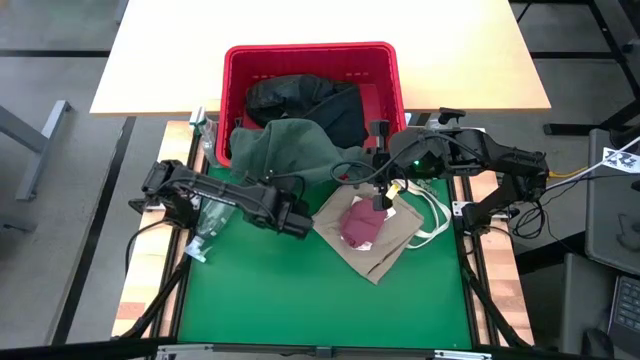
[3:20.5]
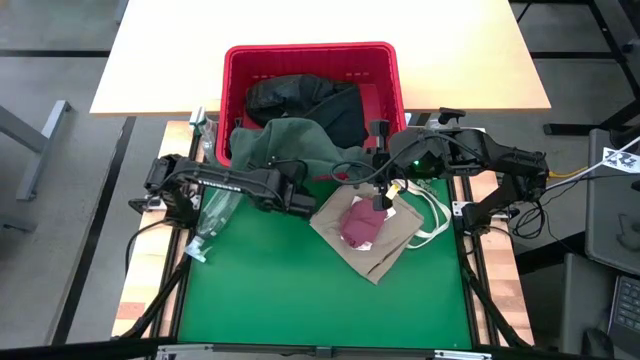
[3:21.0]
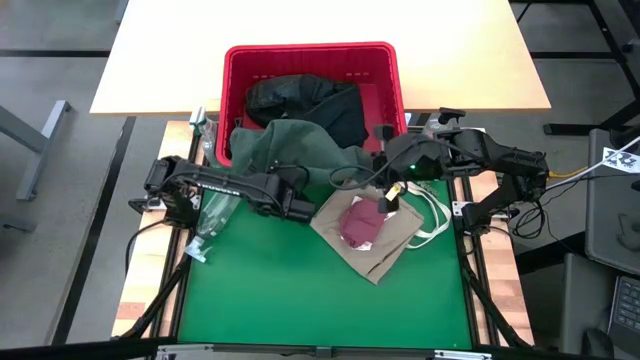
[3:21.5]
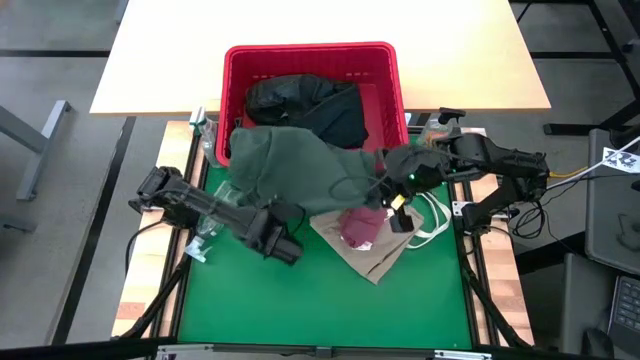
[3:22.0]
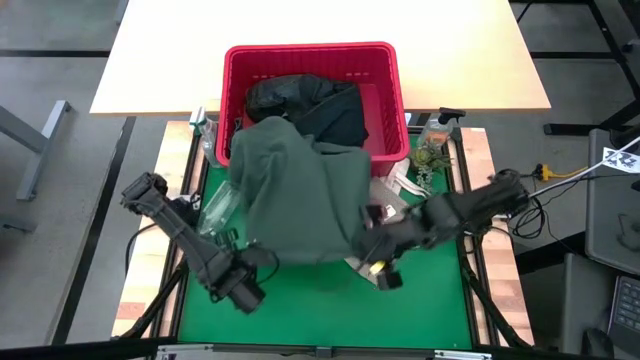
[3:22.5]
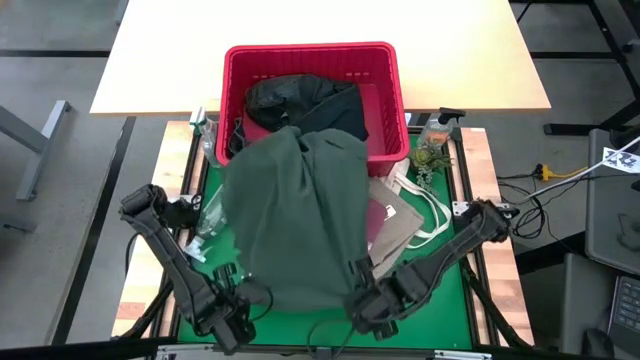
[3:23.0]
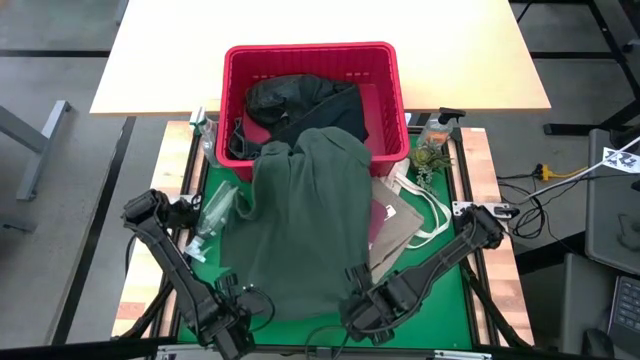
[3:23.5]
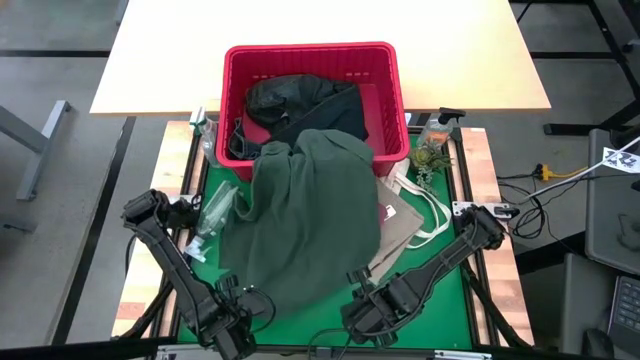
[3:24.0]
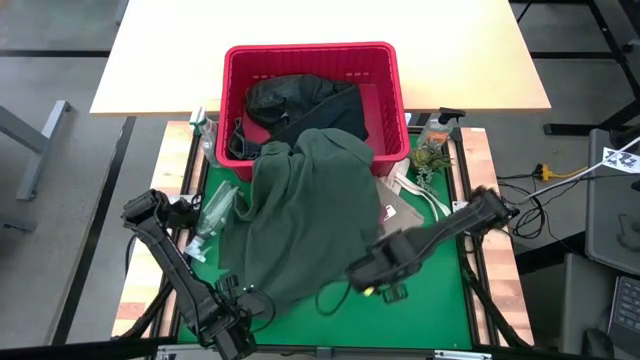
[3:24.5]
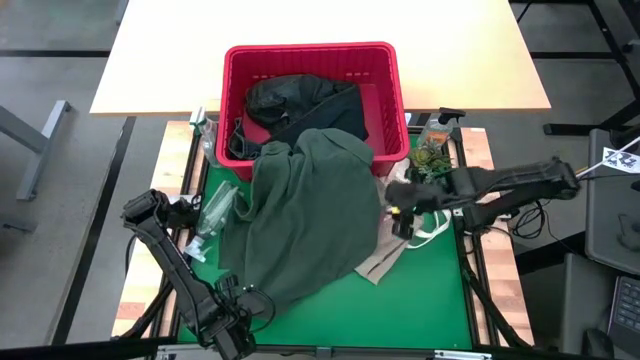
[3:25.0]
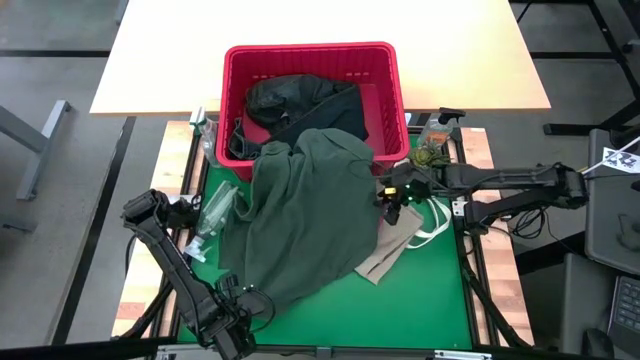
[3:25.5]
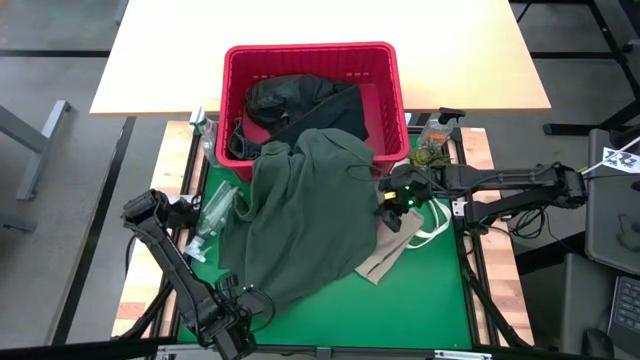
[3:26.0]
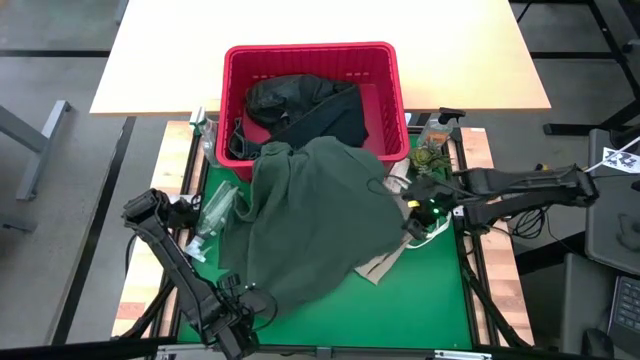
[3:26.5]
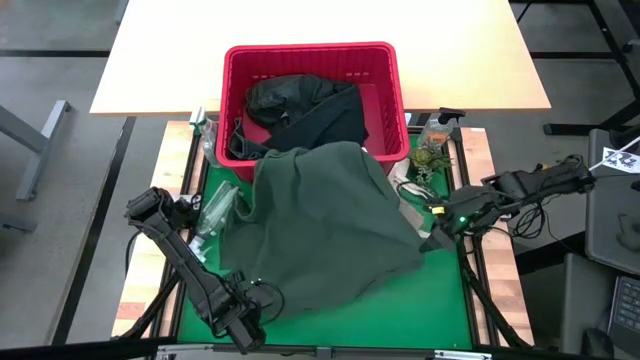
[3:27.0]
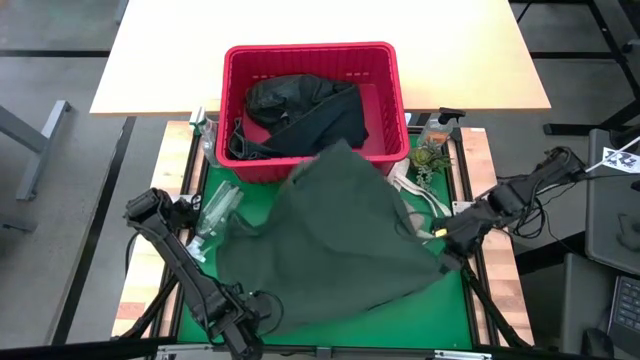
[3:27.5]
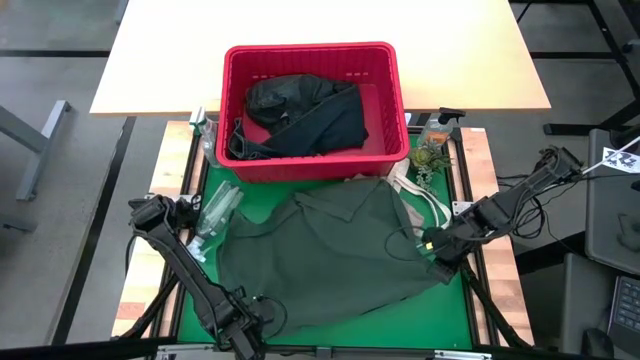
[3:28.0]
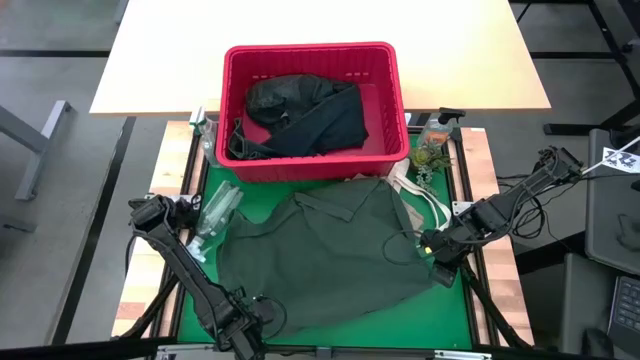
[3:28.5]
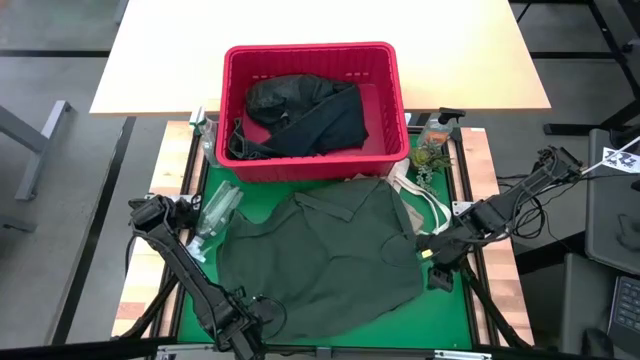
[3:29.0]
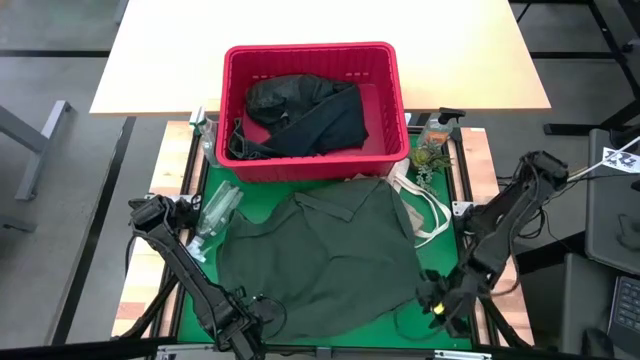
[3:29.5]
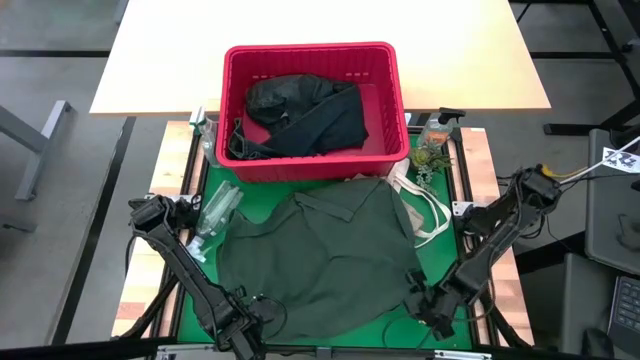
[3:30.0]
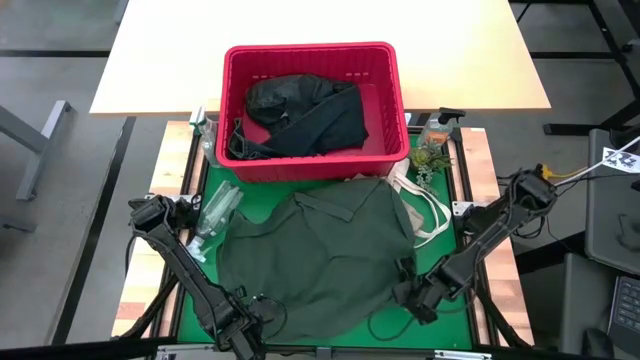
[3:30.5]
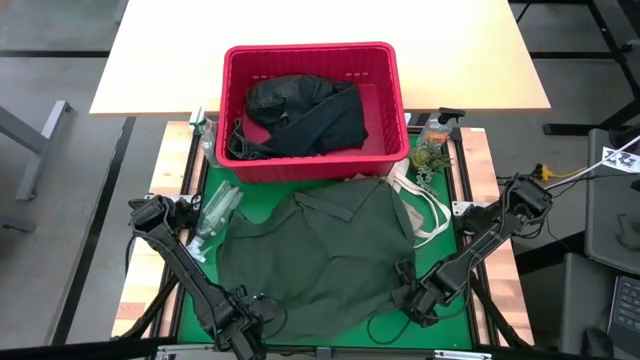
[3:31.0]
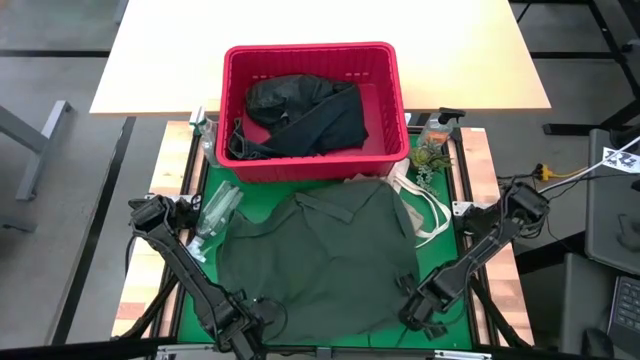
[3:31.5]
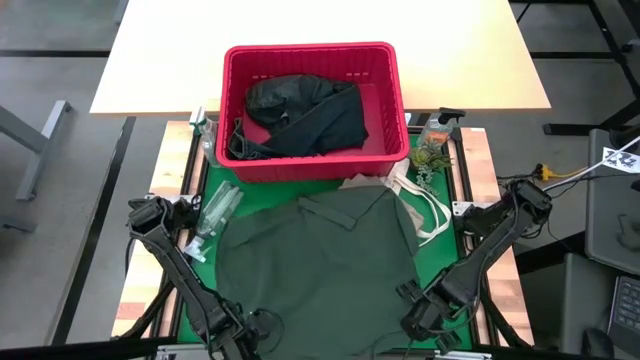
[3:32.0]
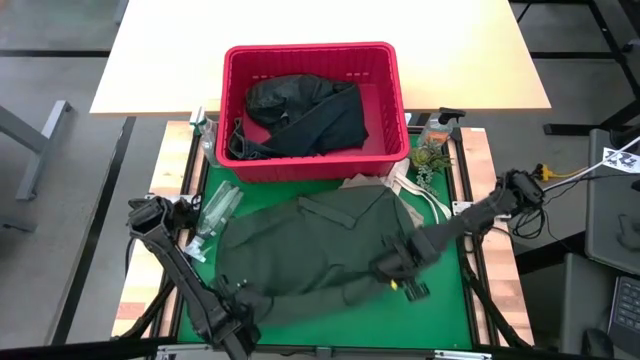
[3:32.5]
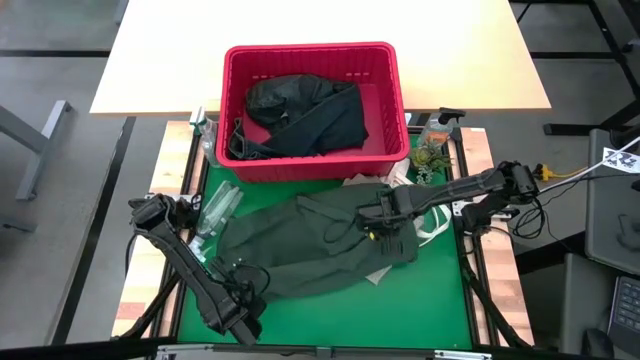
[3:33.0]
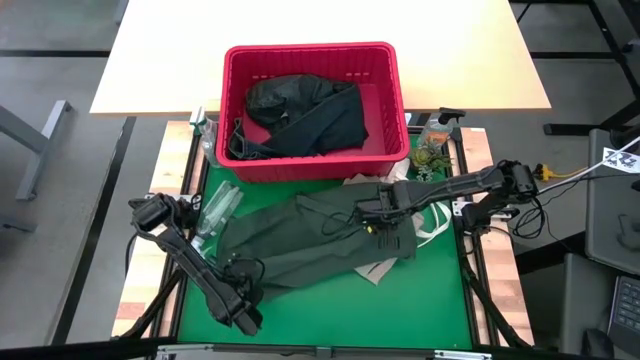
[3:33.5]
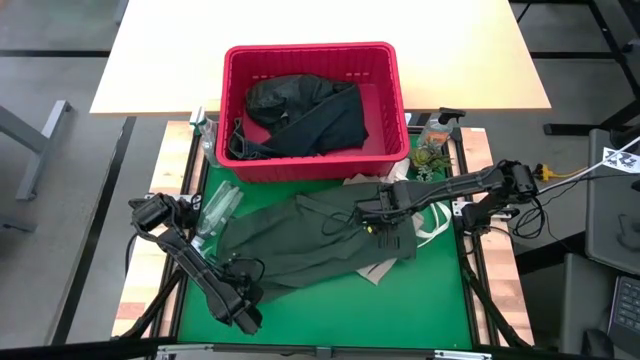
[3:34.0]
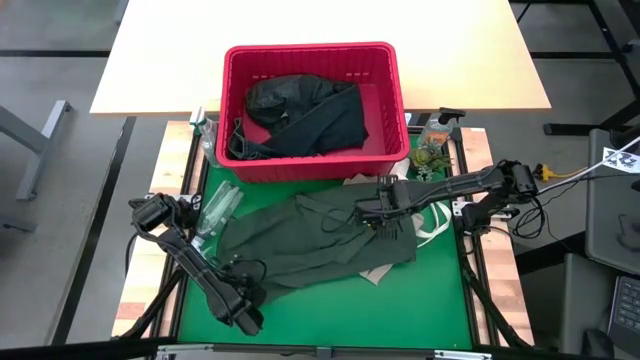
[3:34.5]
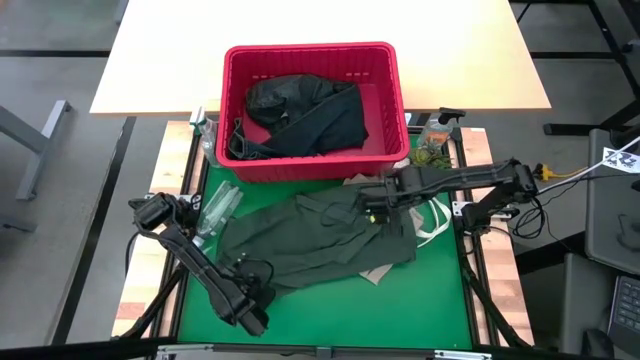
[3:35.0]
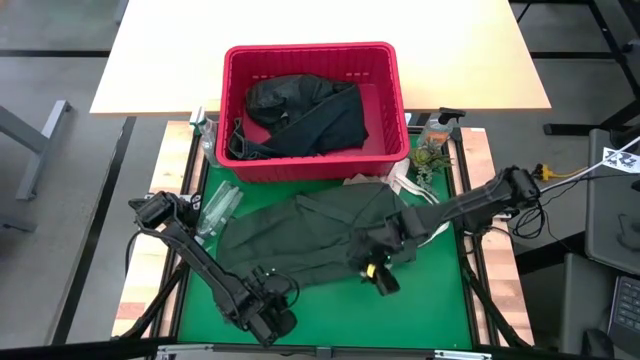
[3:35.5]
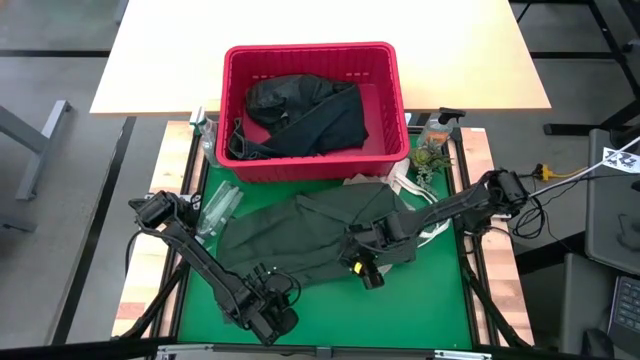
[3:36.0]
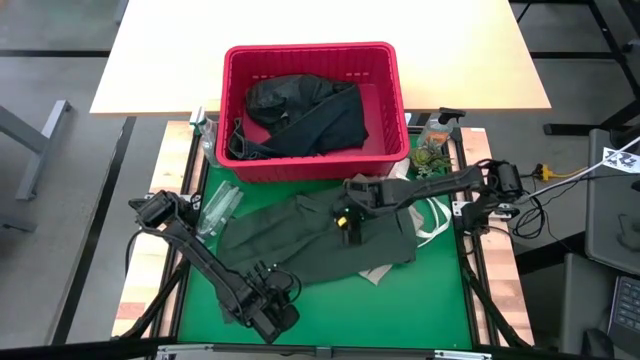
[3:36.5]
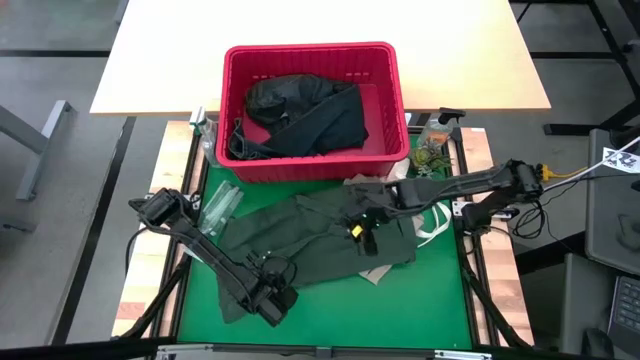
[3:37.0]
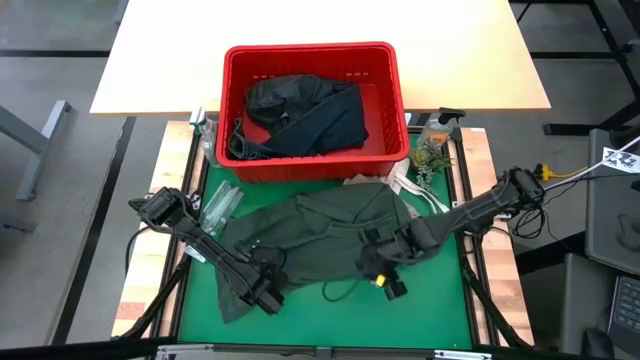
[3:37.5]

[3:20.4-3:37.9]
Task: Fold laundry
Fold the green polo shirt

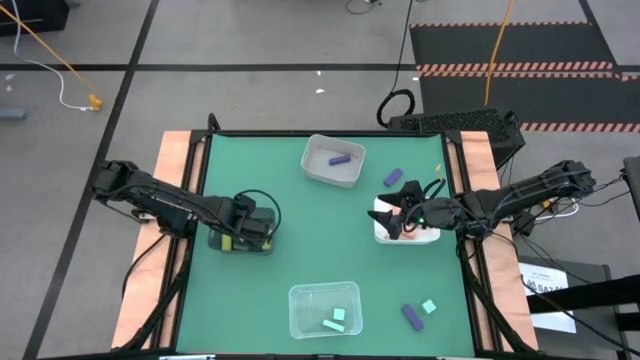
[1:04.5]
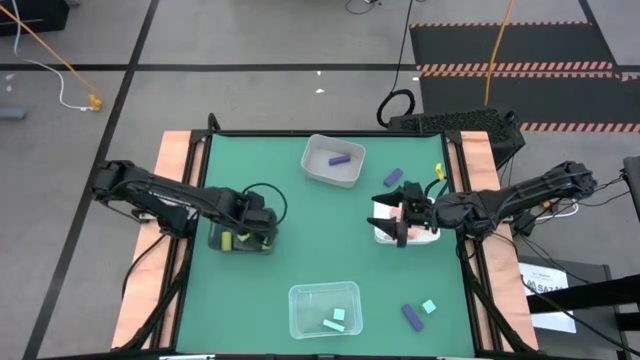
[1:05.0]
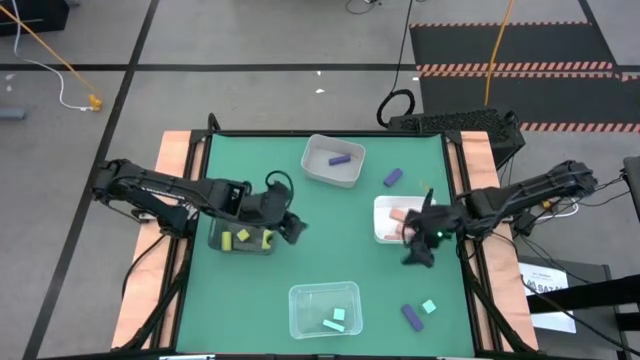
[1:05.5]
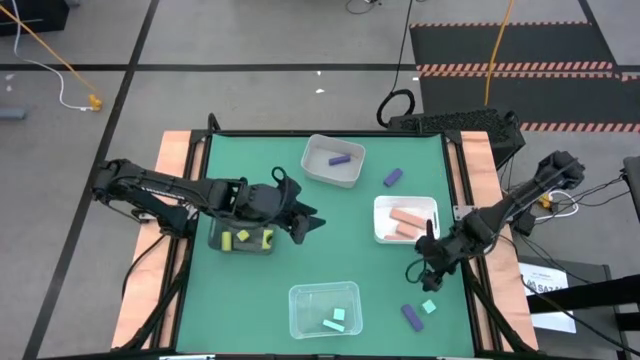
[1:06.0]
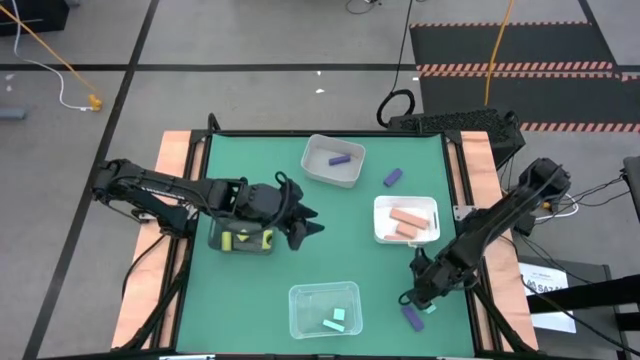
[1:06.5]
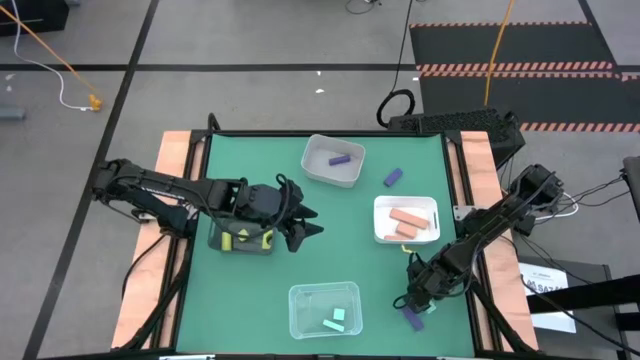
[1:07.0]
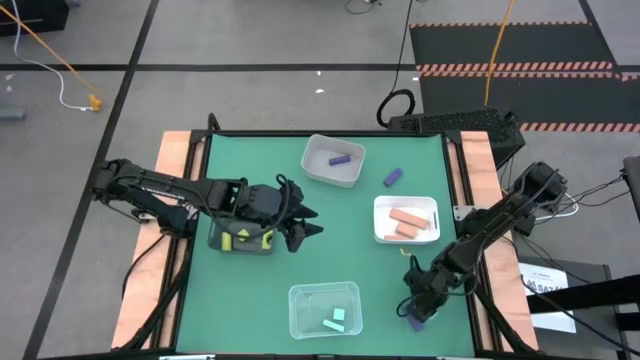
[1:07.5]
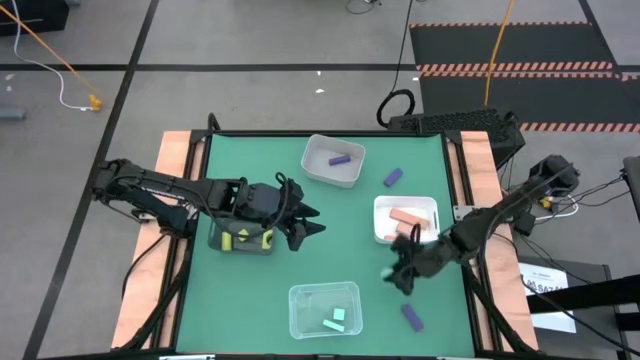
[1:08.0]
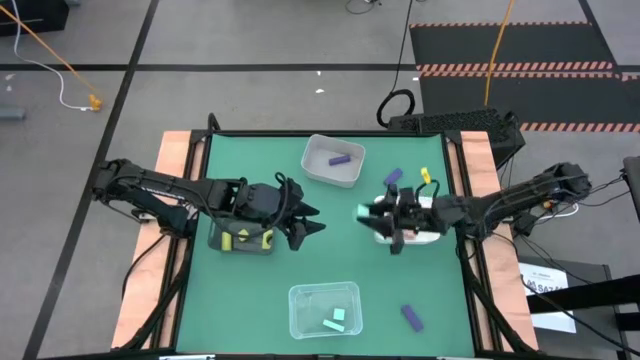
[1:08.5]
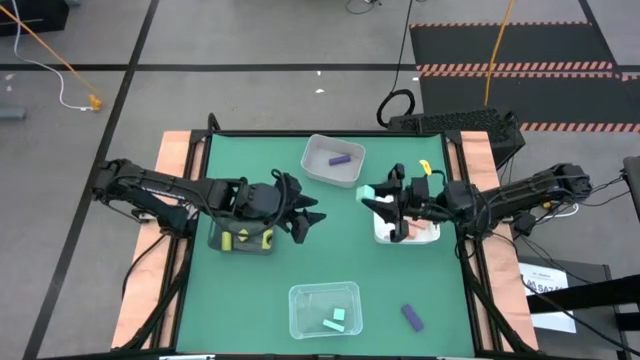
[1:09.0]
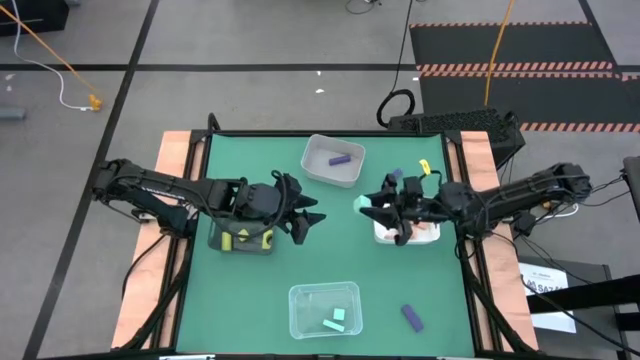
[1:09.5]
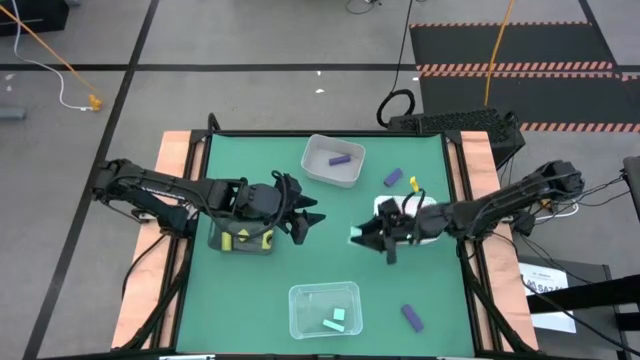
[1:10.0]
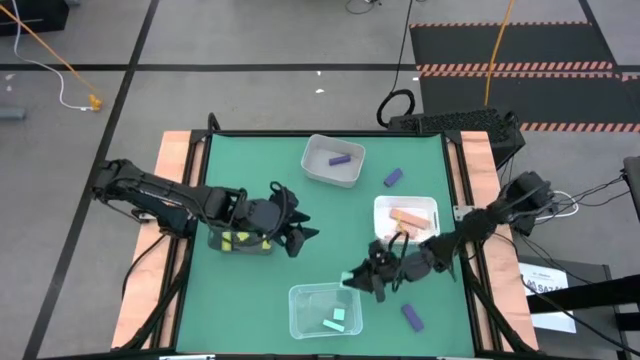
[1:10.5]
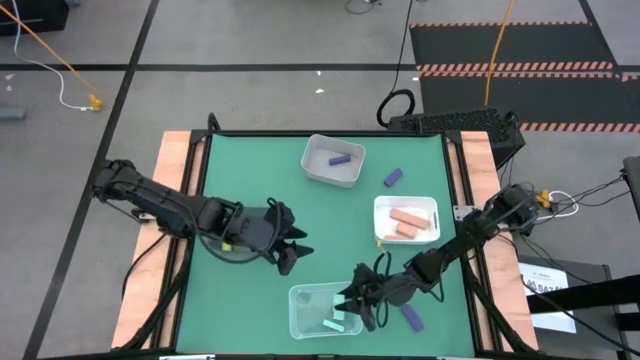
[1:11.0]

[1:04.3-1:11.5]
Task: Sort & place blocks by color
Put the light blue block into the transparent bin
